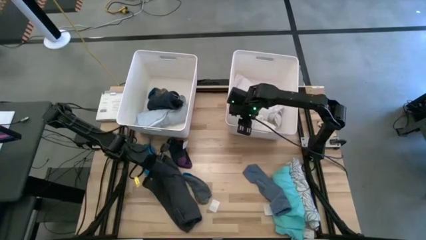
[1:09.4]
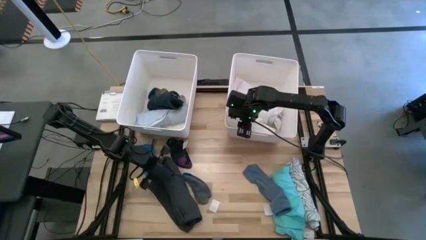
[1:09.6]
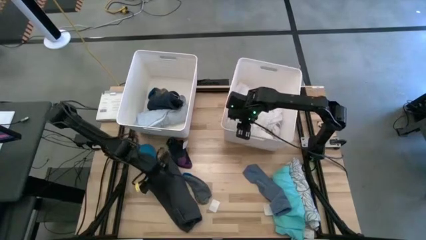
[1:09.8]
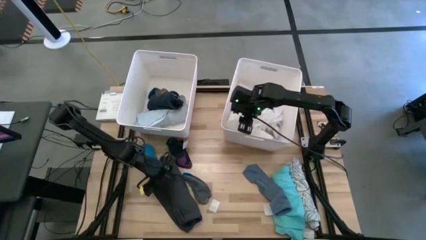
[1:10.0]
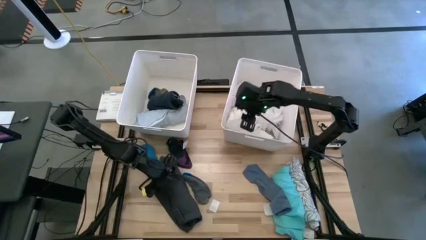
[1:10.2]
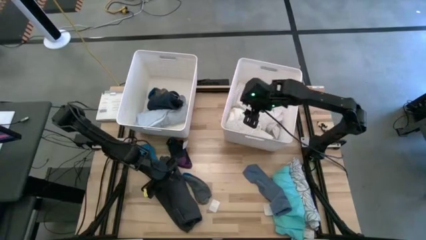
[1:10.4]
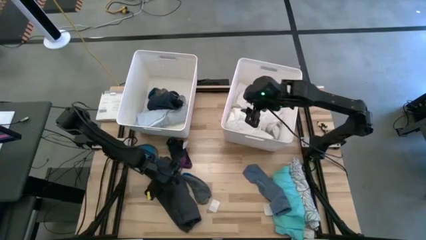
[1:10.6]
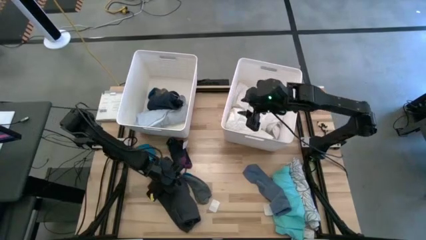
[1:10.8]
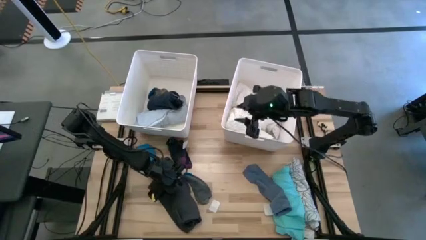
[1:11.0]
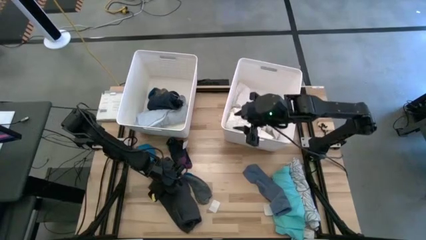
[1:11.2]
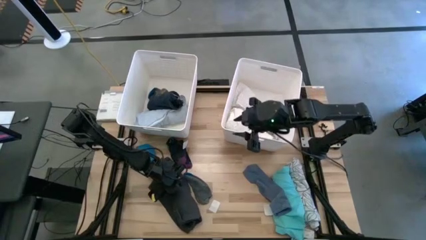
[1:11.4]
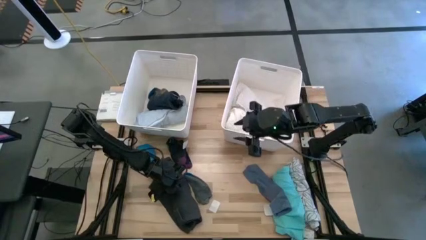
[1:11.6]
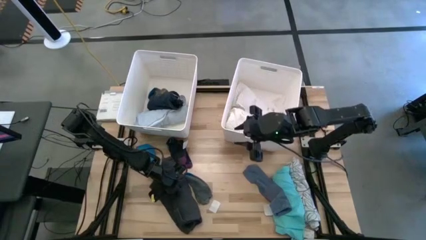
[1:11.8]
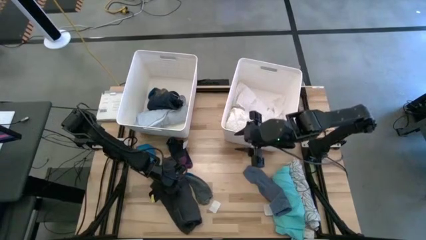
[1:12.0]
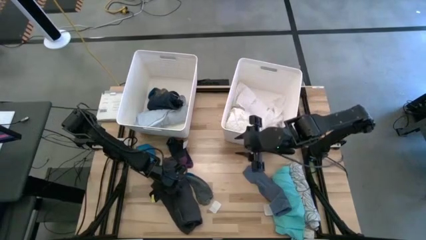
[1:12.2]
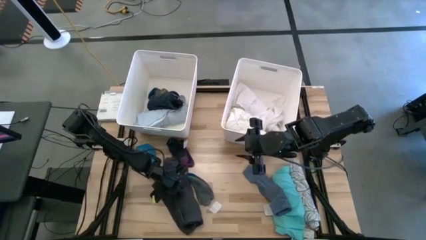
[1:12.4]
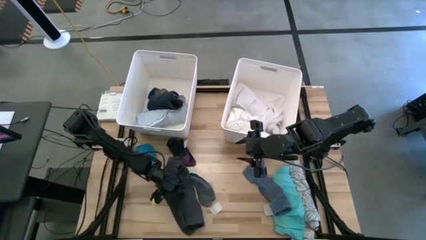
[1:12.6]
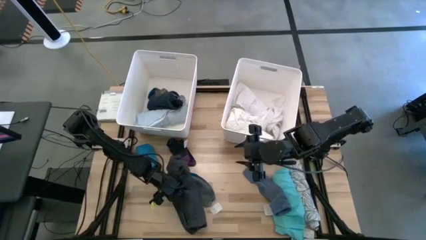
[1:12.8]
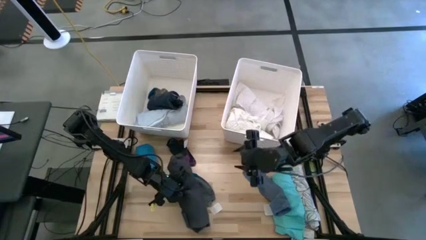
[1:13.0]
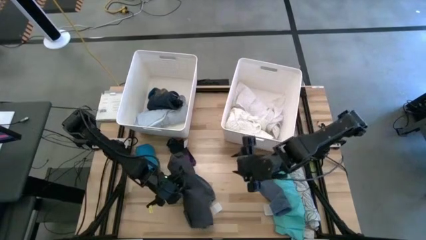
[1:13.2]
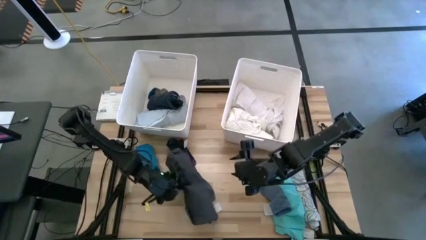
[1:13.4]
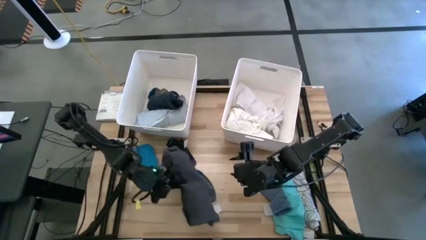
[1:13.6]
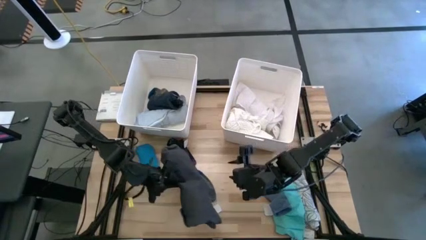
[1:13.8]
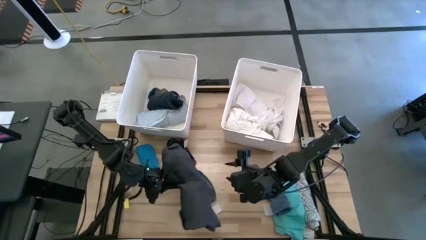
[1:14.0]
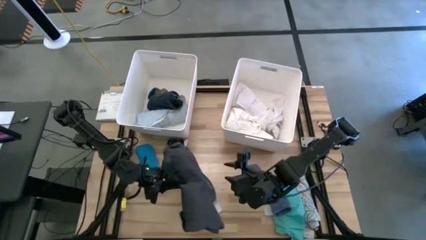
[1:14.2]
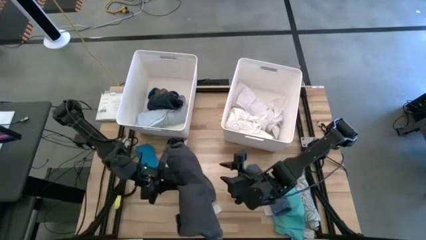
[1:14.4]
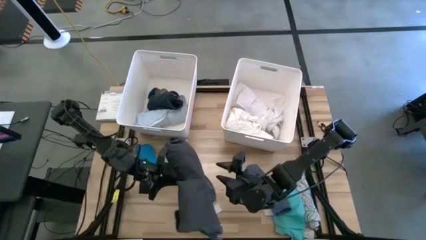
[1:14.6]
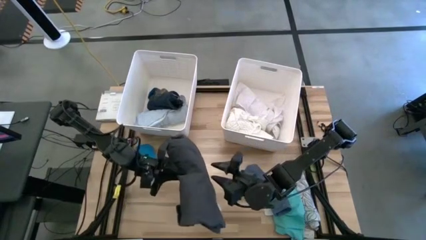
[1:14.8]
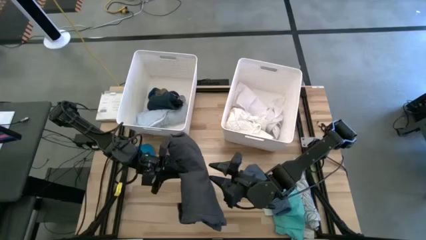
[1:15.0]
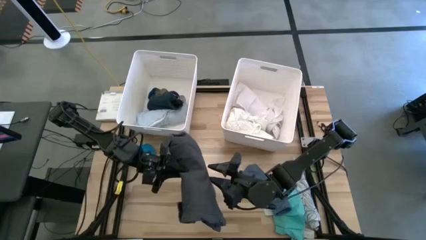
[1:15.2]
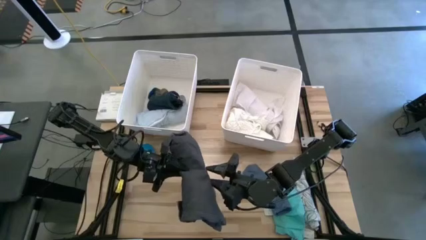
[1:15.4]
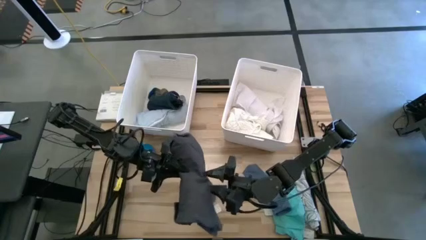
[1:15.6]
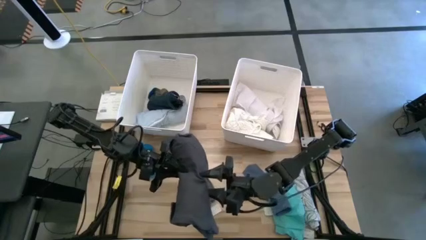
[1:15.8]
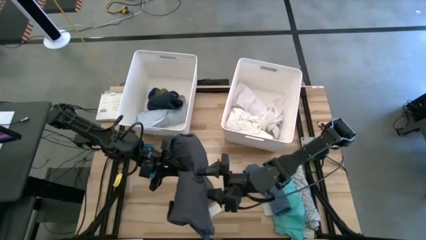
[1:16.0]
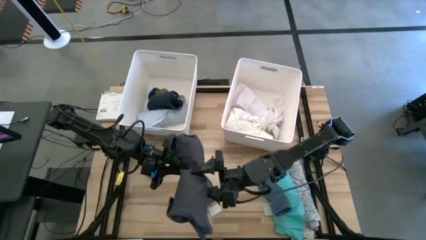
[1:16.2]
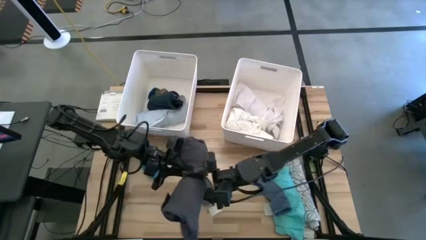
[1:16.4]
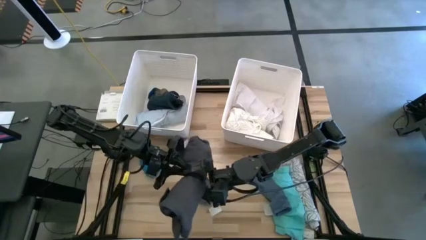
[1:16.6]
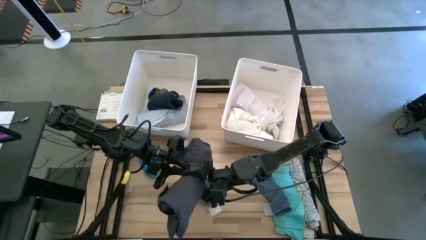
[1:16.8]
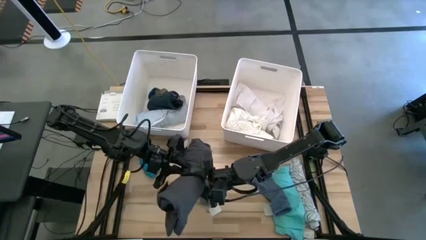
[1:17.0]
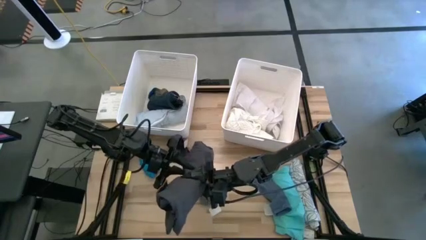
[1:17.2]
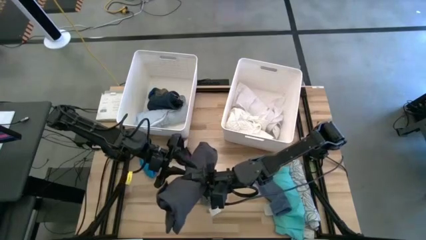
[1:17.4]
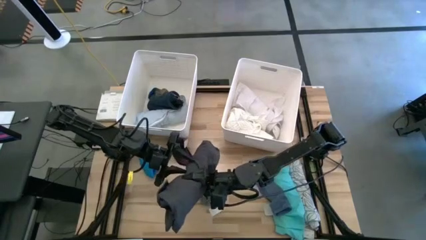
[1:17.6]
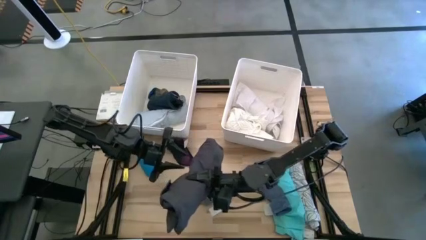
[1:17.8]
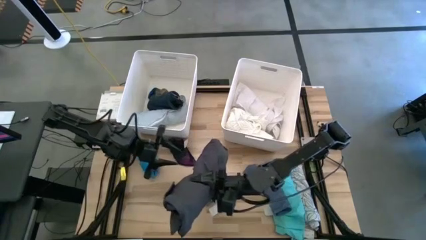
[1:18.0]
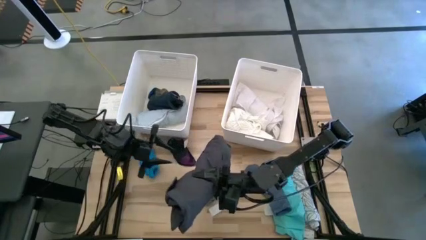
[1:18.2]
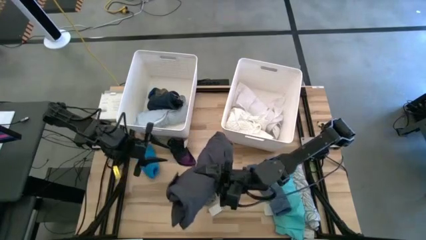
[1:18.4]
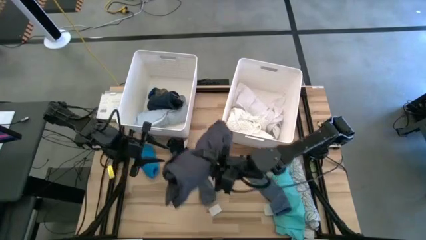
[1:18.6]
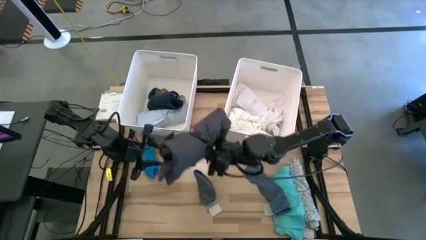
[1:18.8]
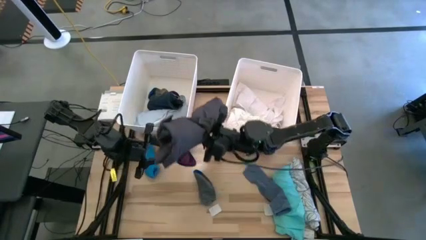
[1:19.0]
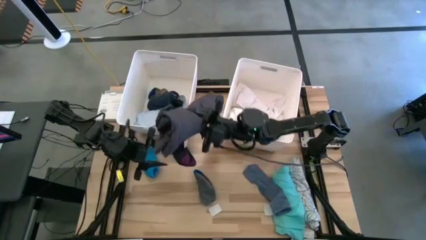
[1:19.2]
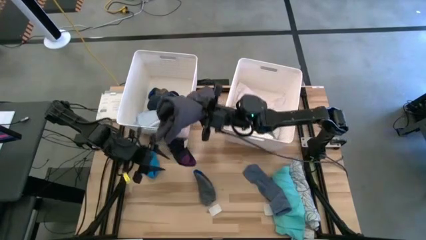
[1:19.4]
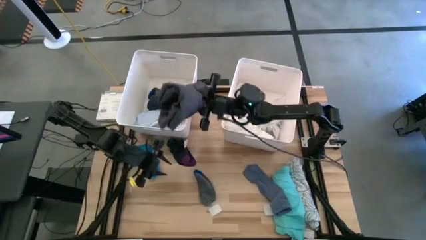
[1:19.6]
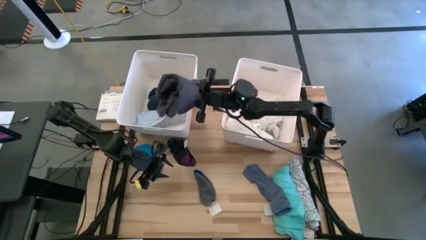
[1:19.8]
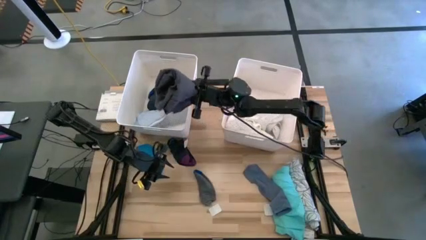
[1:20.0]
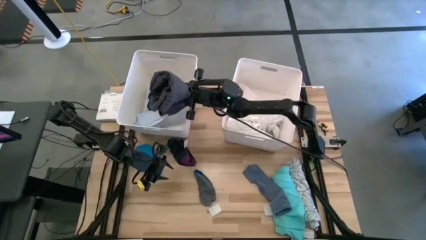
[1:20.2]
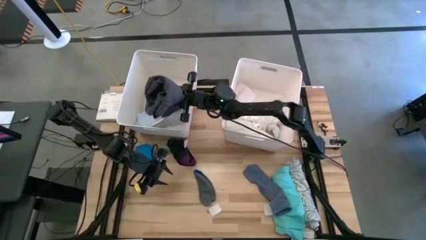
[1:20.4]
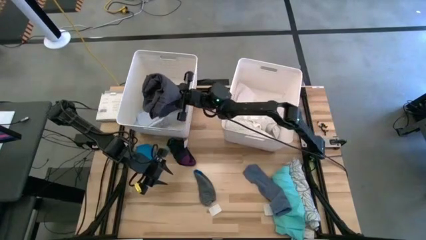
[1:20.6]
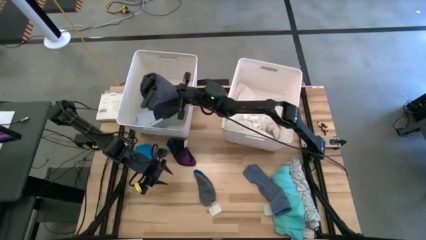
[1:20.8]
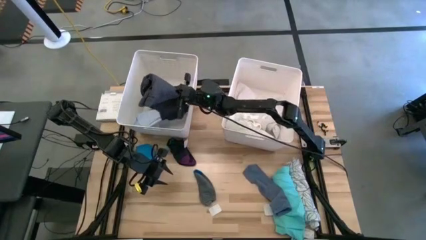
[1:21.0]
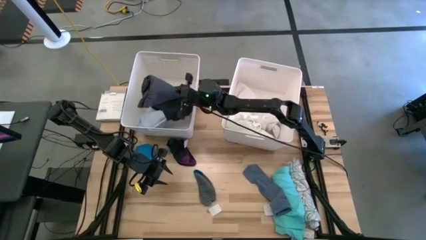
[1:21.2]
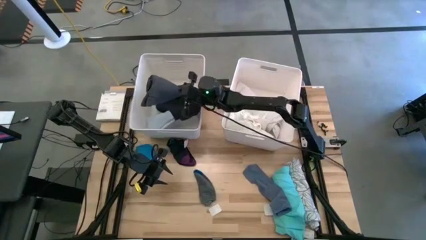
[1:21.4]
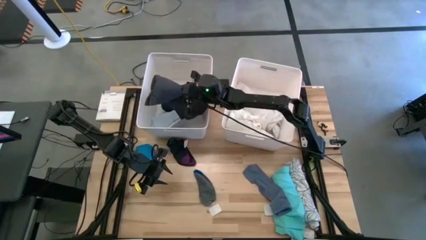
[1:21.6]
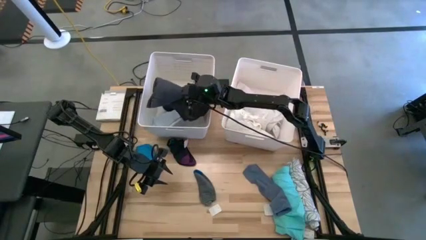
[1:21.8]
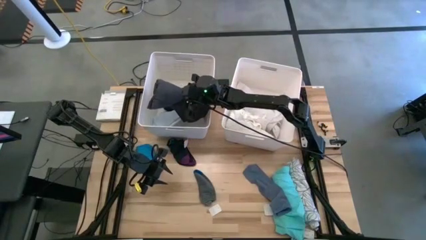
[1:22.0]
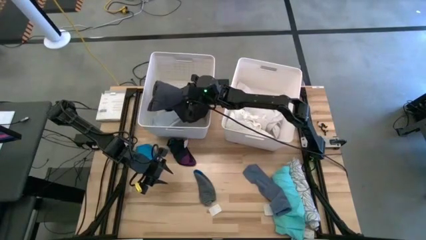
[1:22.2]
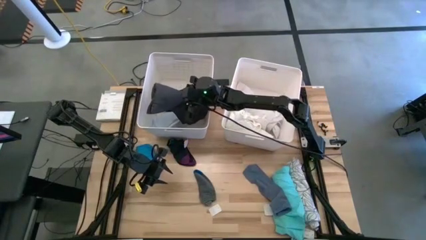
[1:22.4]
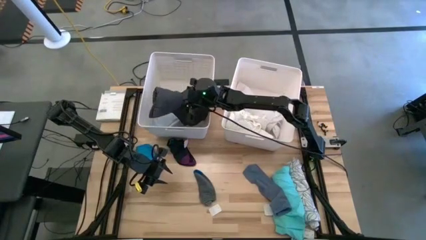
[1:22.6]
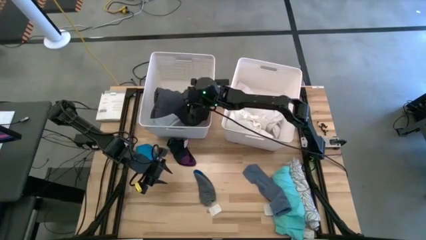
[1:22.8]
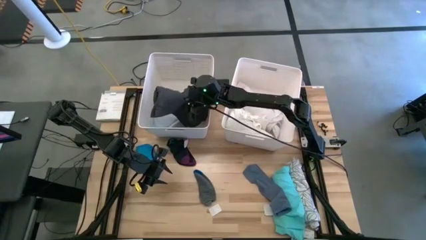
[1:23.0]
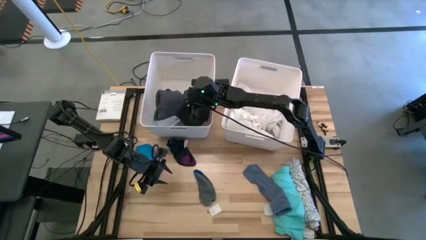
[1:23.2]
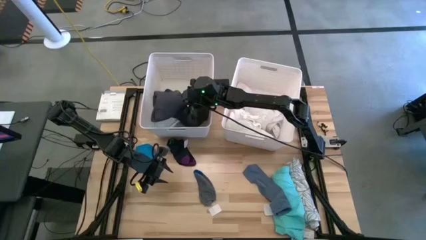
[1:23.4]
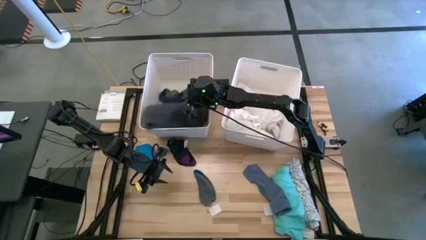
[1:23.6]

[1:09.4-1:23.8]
Task: Sort clothes
Put the rolled black shorts into the left white bin
